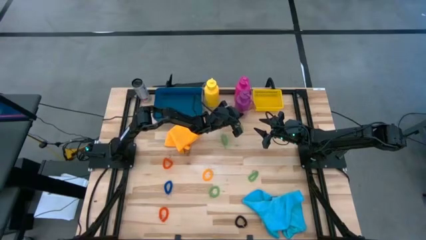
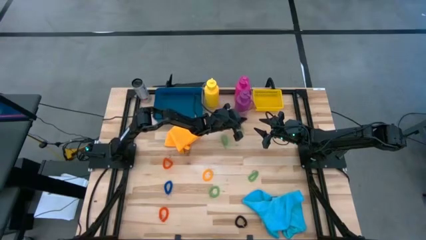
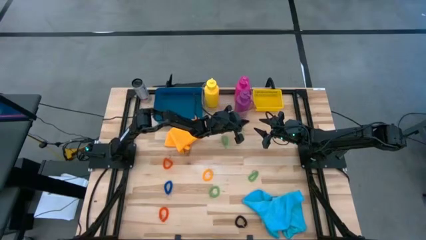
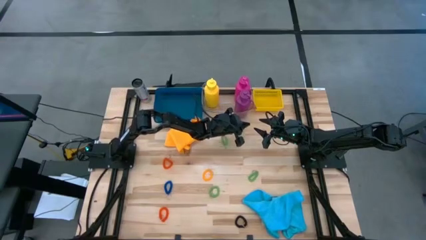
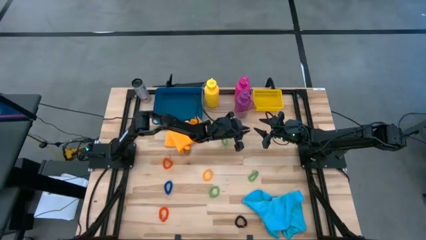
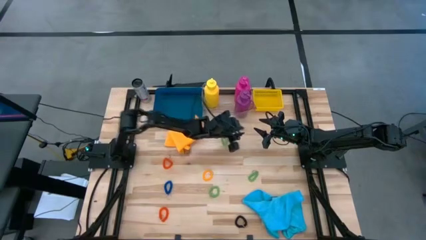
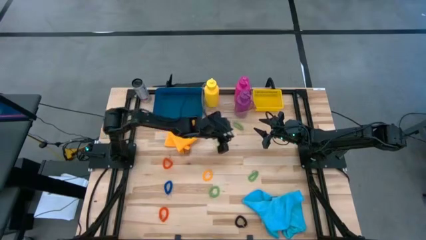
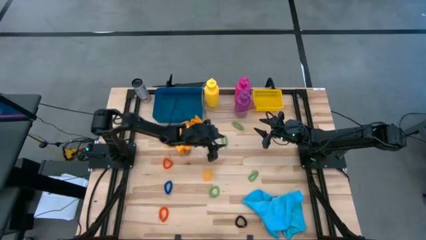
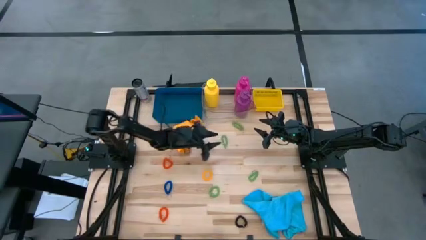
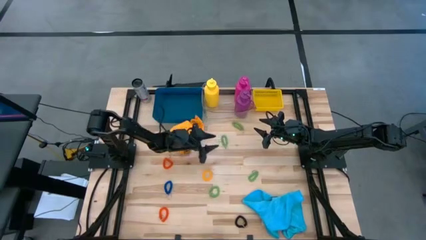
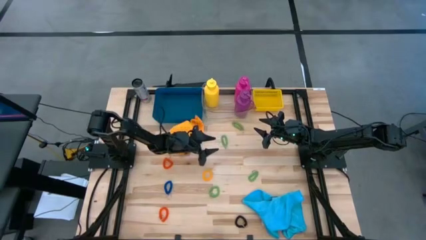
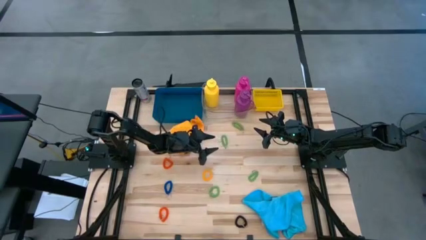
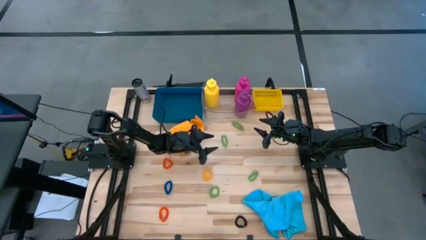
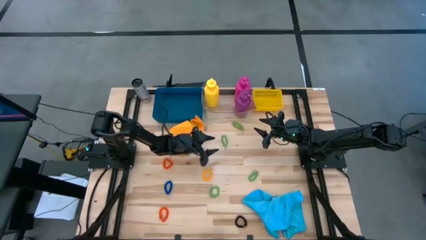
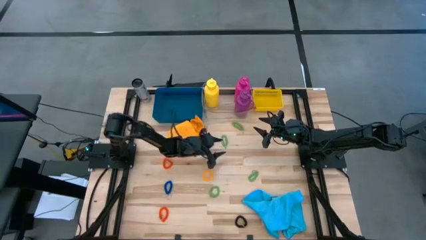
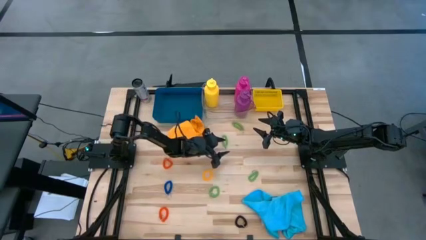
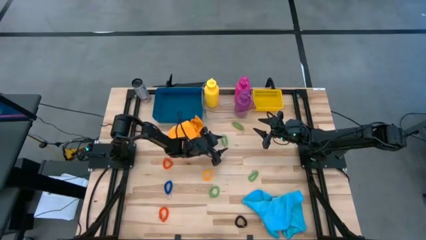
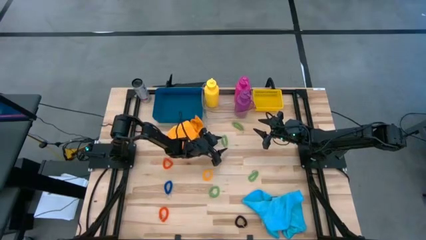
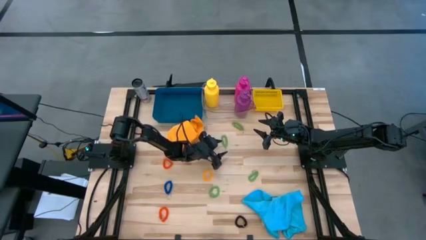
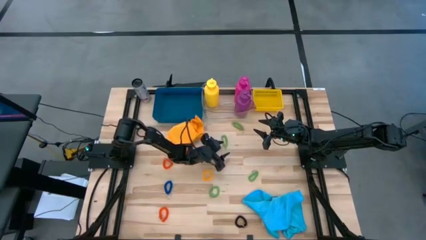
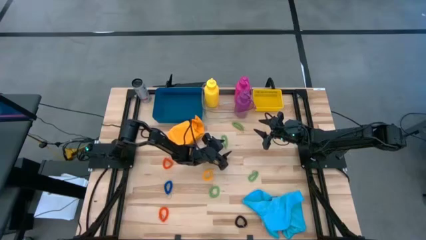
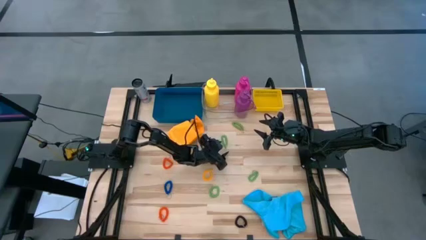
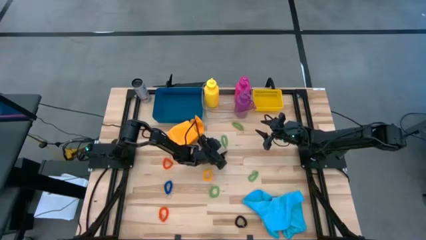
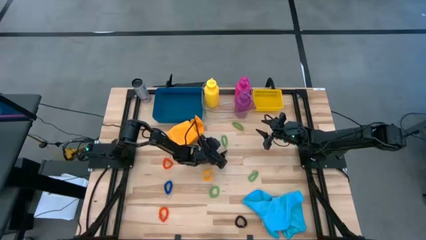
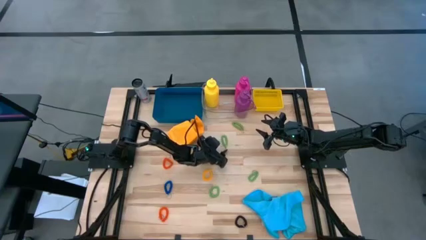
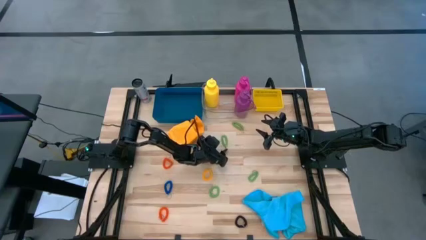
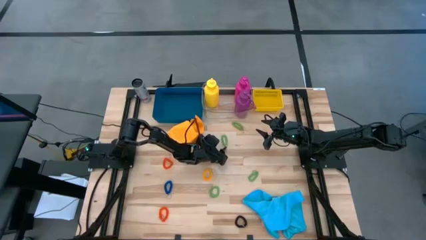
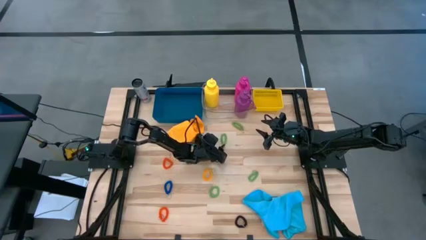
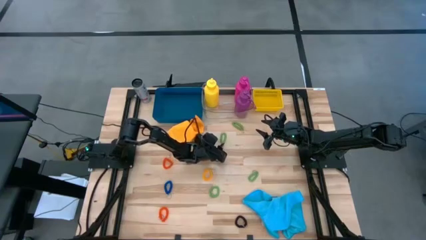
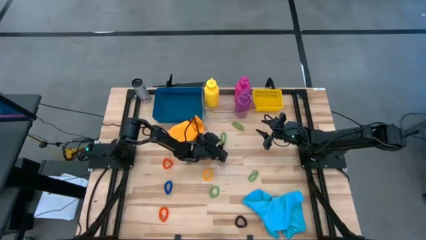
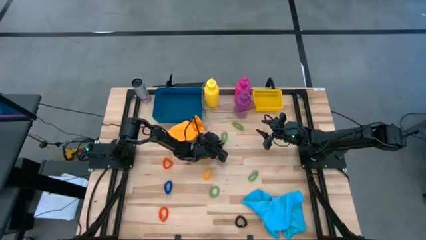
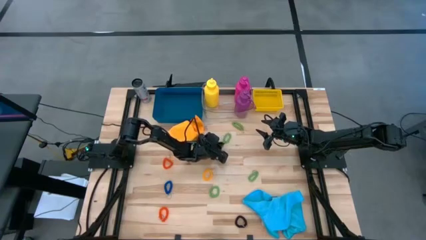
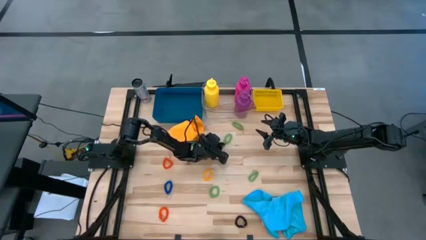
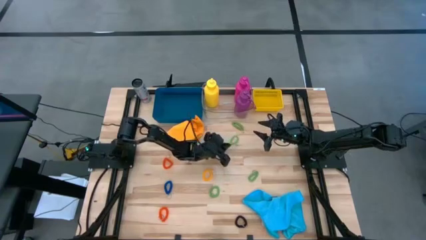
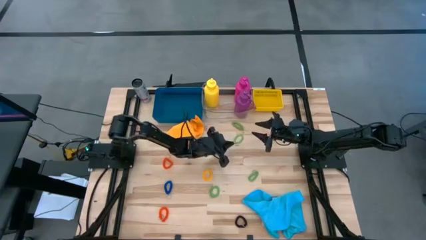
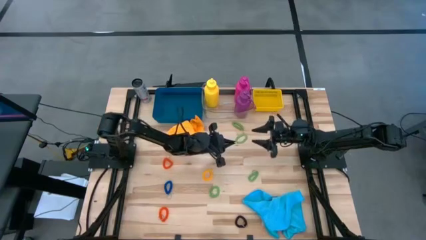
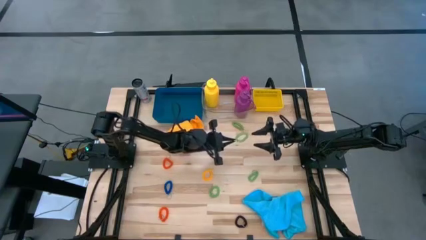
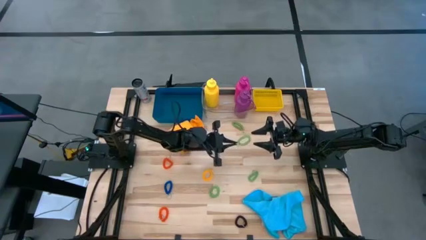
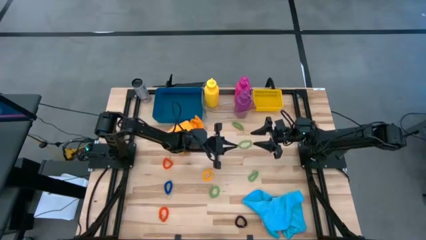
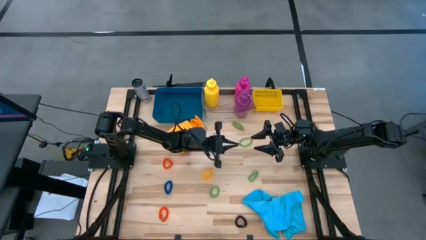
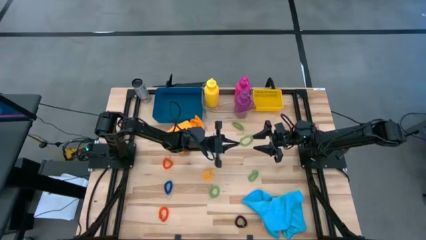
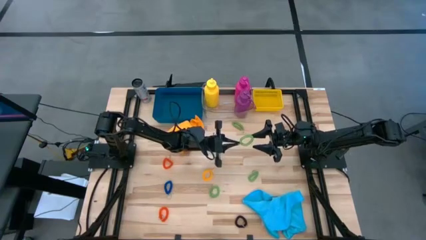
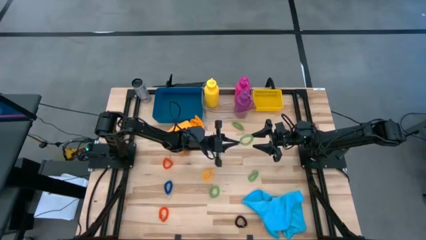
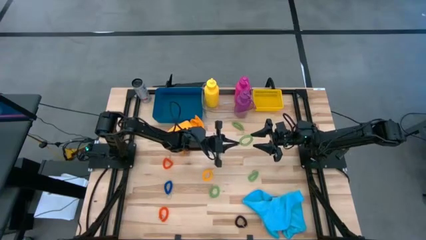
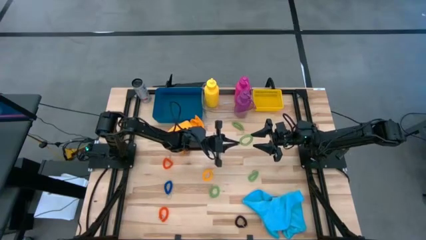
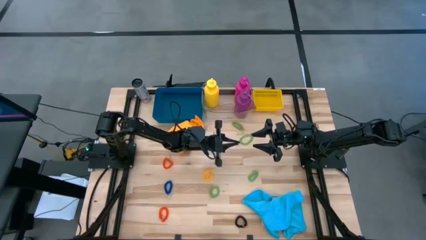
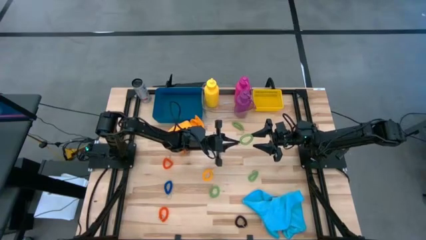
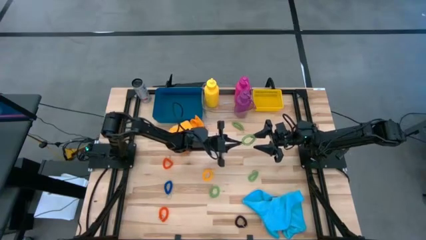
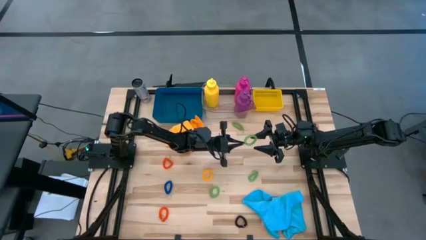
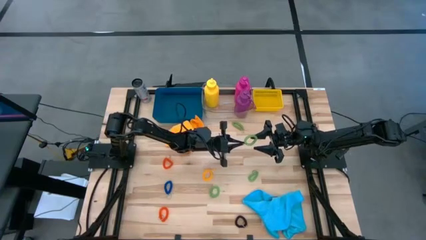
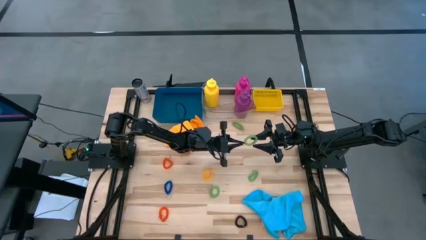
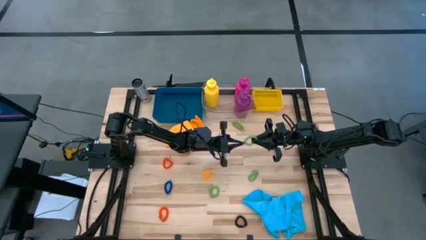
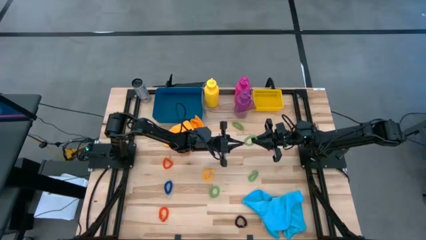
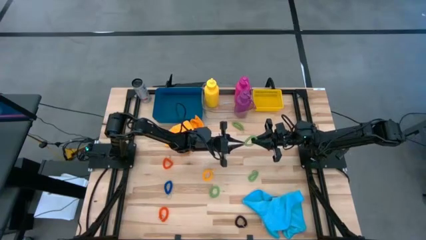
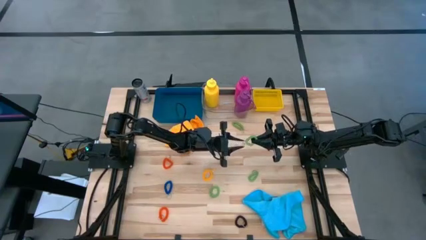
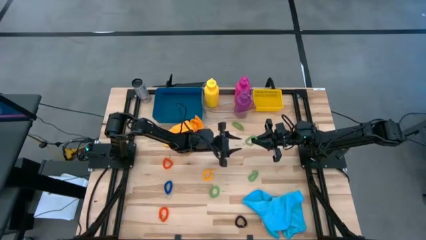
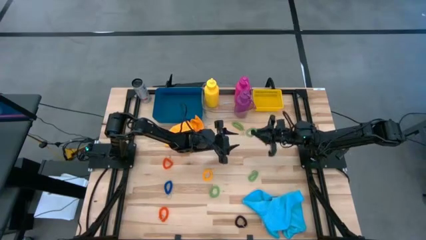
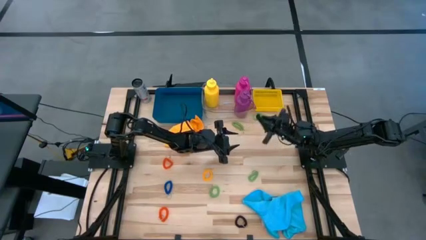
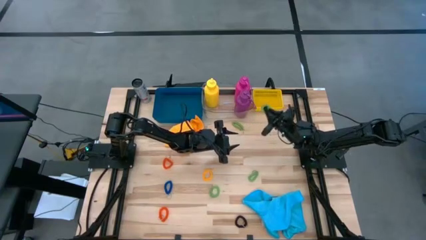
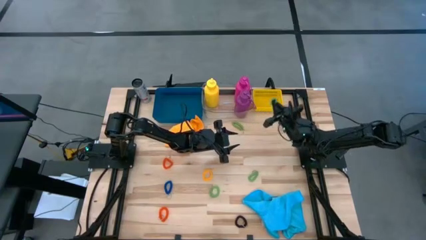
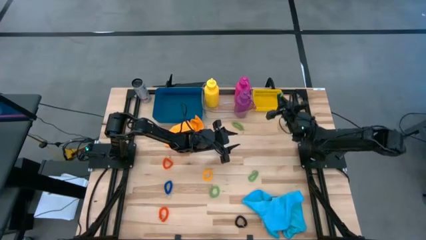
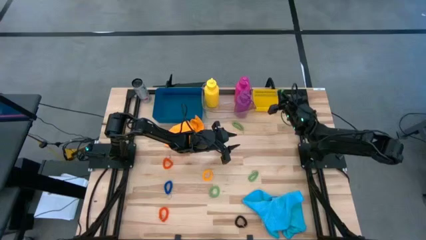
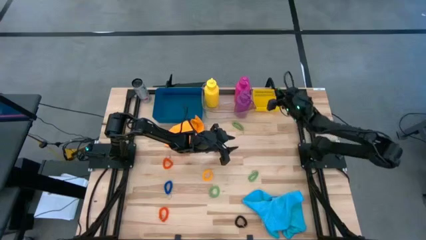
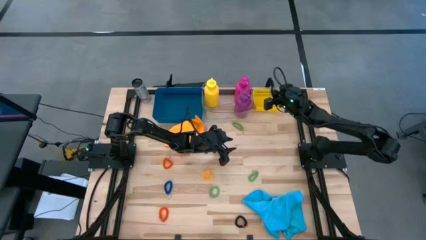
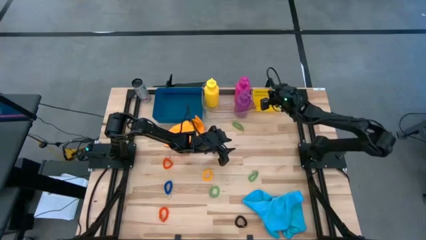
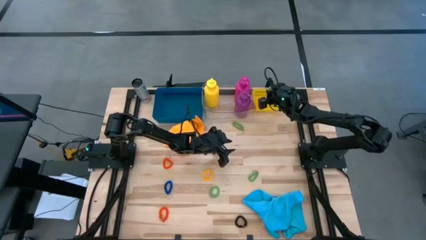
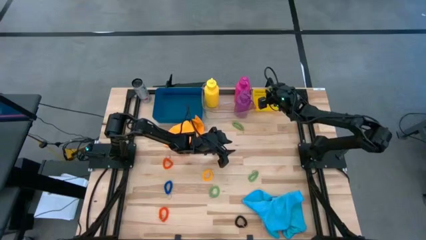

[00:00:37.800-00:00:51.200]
Task: Pick & Place Sports Items
Put the green spring keychain into the yellow bin
